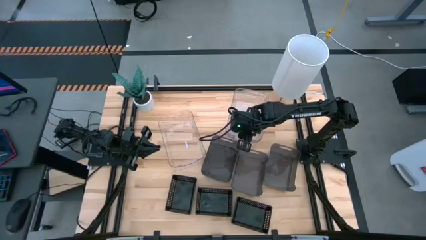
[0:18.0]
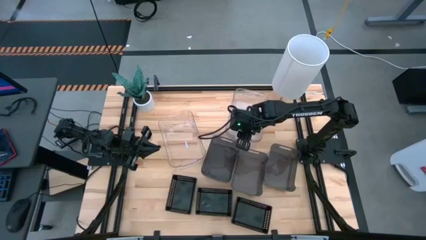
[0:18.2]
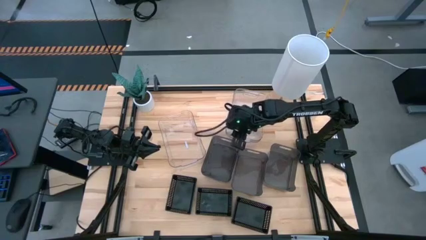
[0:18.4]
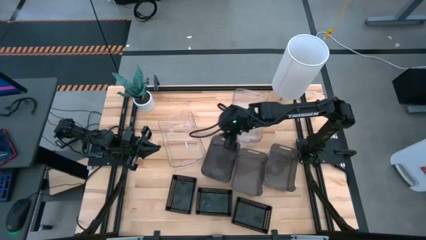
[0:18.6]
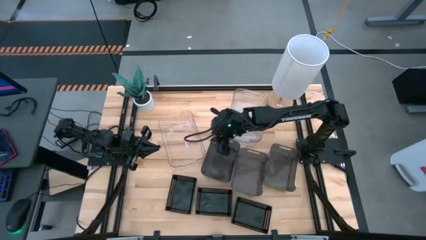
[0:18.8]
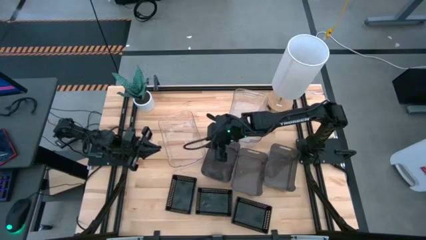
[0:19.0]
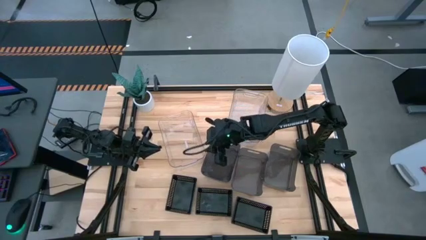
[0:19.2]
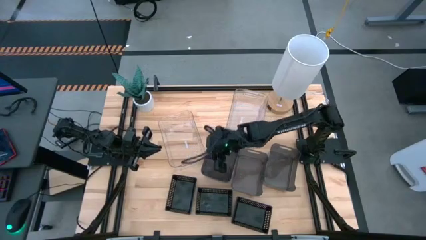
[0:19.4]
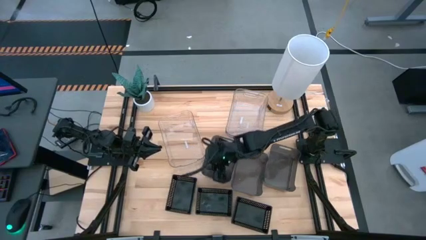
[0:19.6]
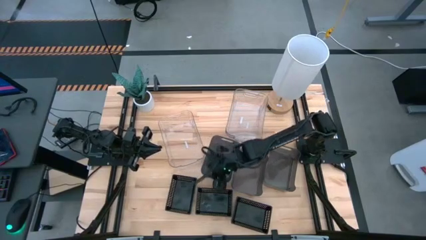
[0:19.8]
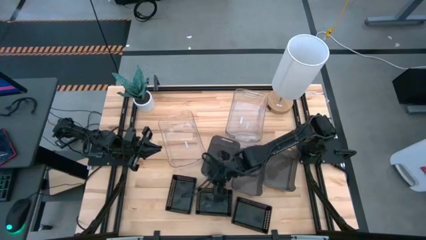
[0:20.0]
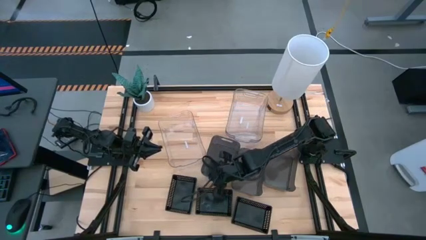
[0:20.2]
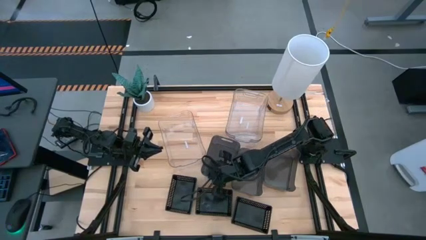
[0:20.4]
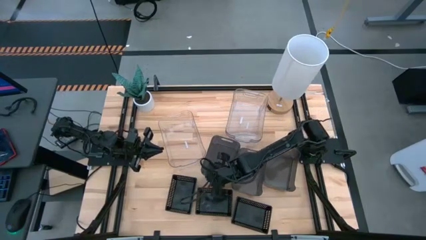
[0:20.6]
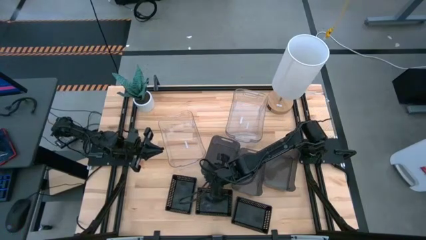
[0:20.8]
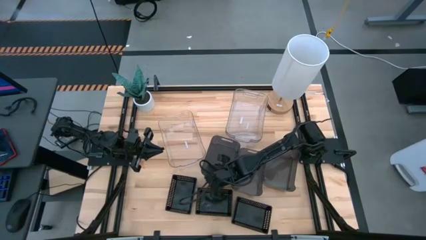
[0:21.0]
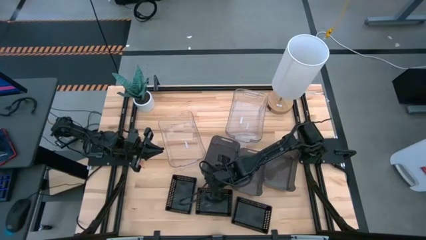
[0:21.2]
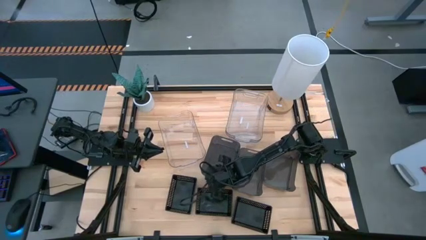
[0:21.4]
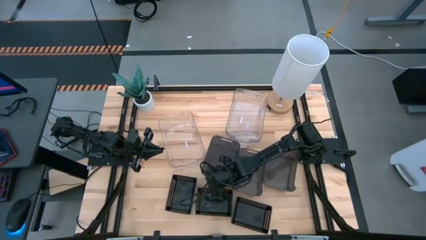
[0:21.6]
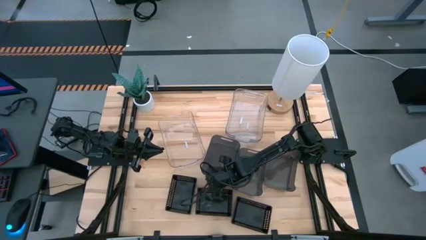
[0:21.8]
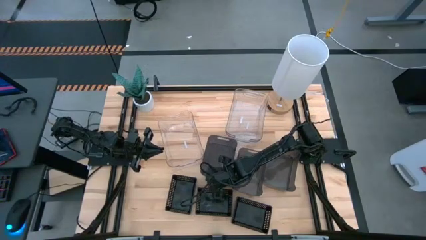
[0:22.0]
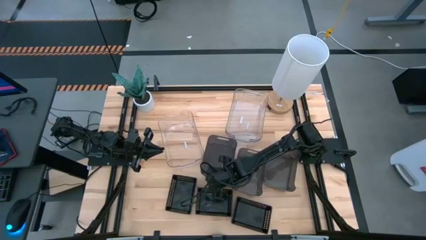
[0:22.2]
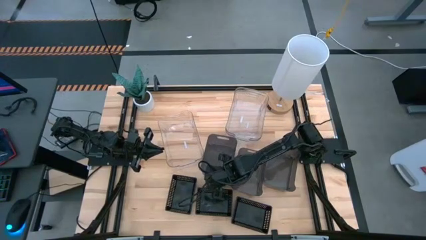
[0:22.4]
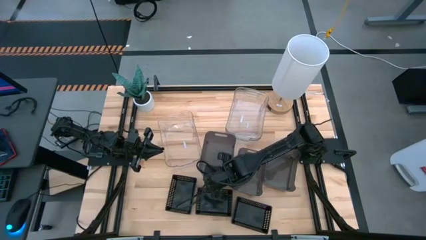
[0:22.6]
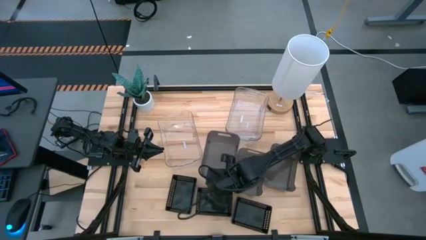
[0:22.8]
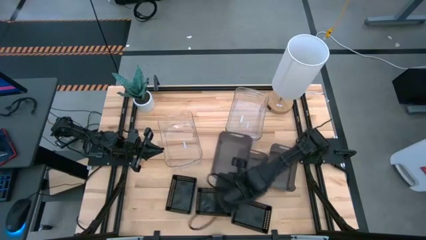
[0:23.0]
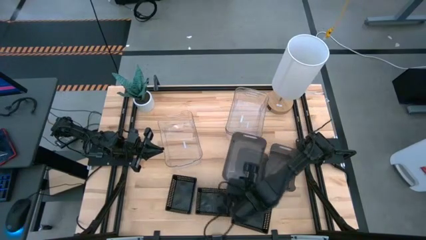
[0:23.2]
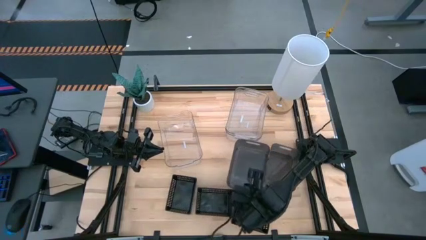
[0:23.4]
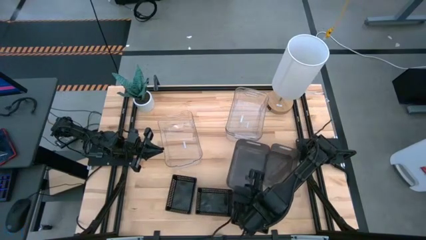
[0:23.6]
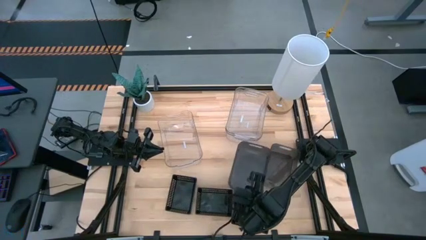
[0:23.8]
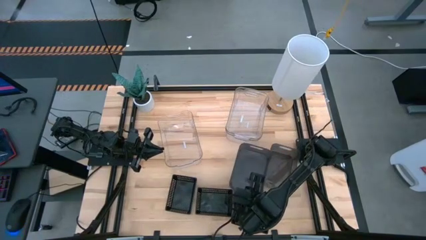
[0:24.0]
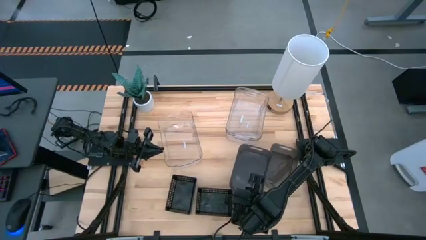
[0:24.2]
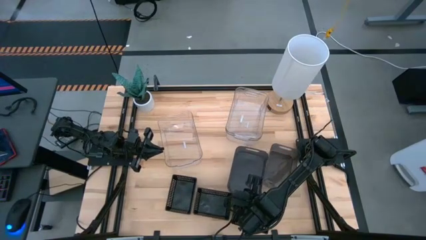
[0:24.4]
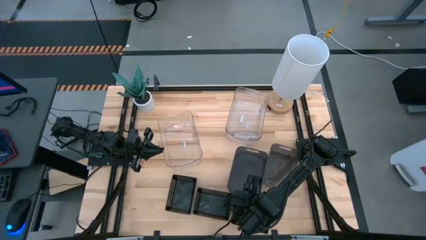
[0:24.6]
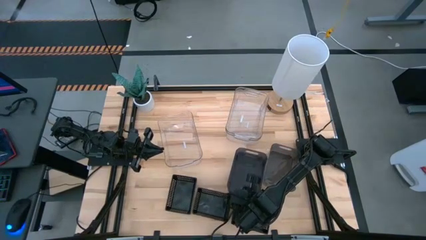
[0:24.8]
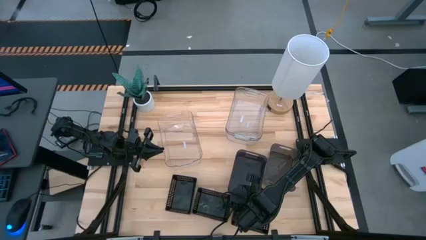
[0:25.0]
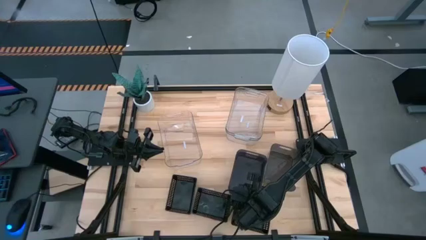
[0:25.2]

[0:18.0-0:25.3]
Stack the left transparent black bin on top of the middle transparent black bin

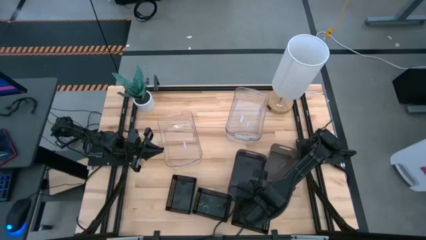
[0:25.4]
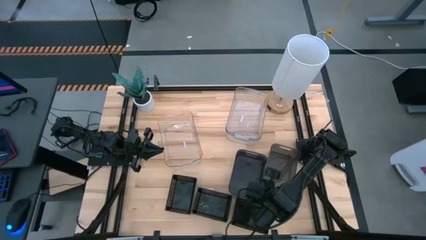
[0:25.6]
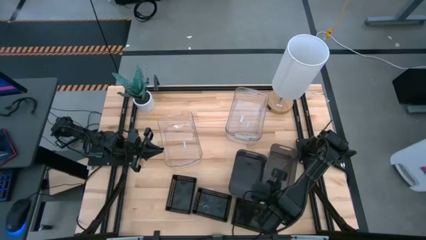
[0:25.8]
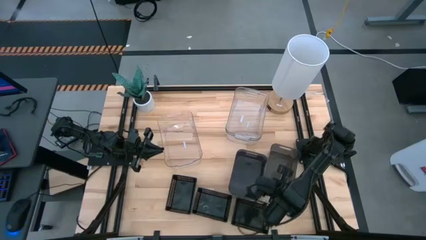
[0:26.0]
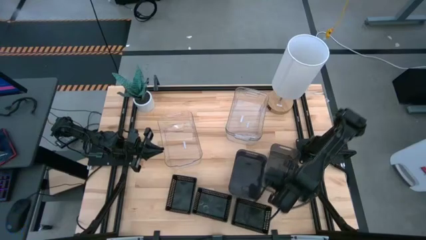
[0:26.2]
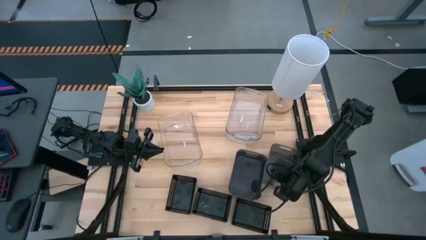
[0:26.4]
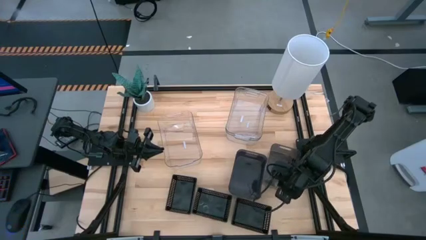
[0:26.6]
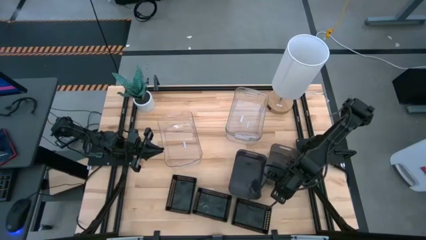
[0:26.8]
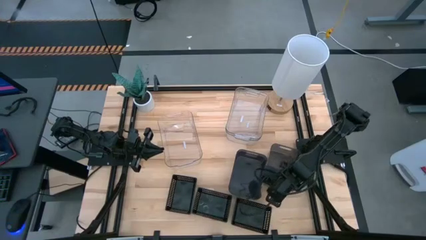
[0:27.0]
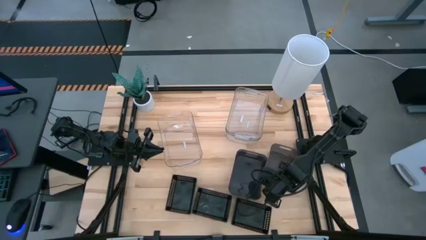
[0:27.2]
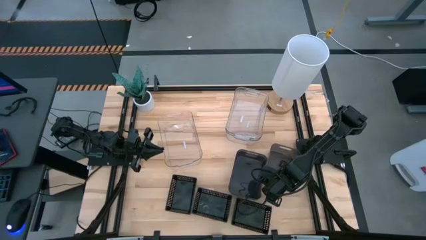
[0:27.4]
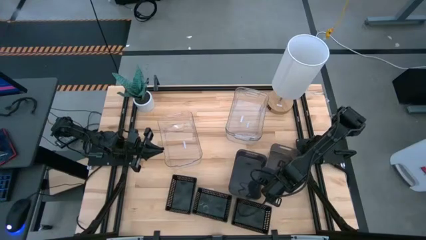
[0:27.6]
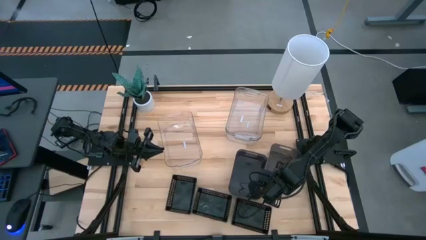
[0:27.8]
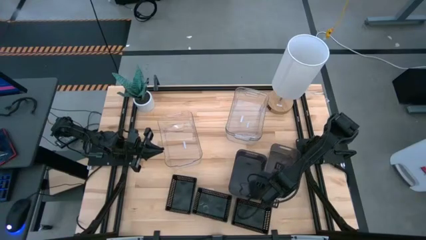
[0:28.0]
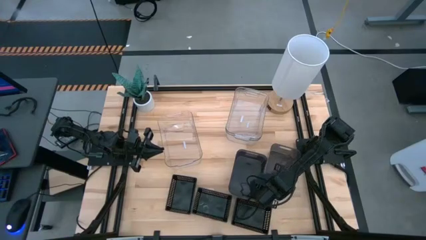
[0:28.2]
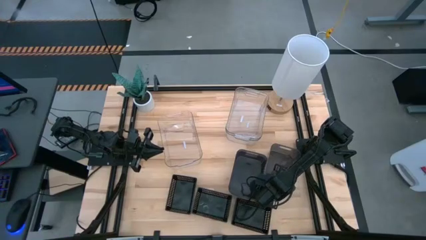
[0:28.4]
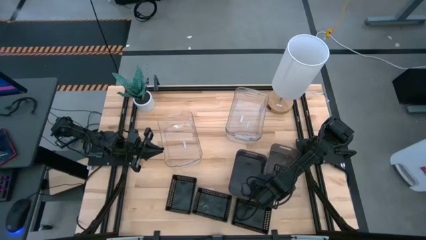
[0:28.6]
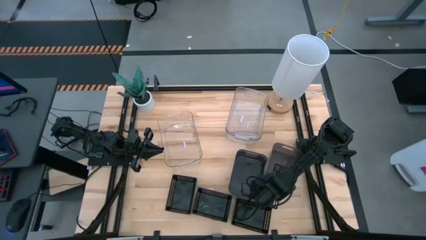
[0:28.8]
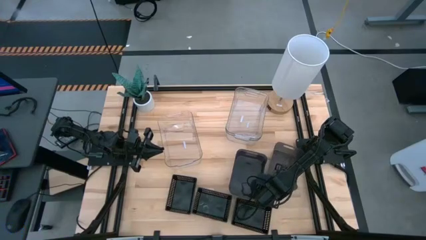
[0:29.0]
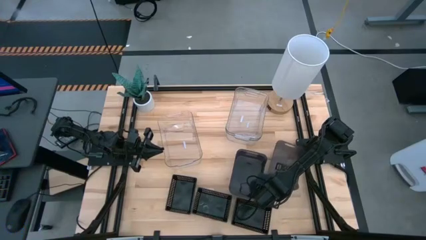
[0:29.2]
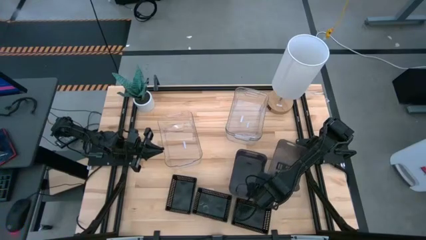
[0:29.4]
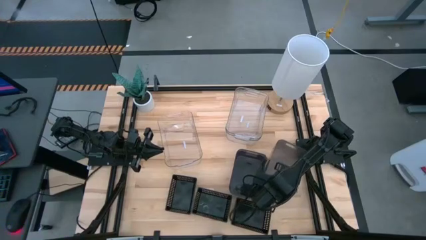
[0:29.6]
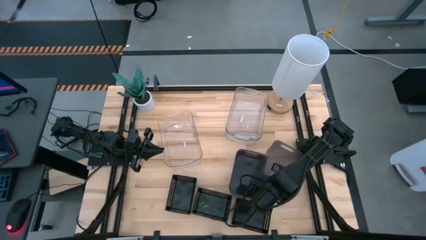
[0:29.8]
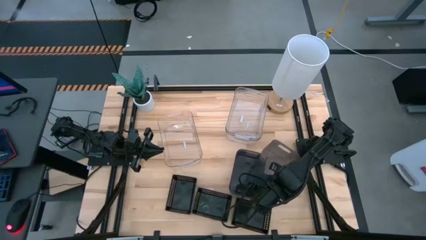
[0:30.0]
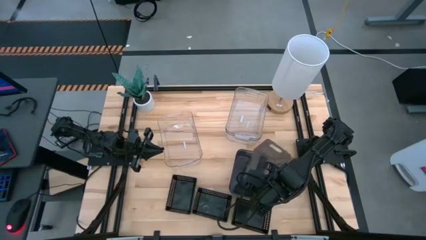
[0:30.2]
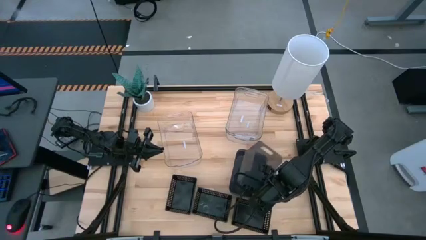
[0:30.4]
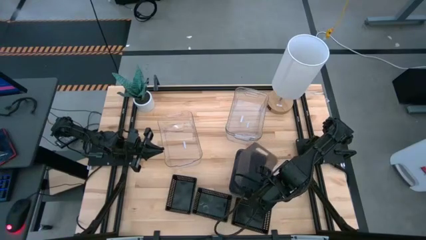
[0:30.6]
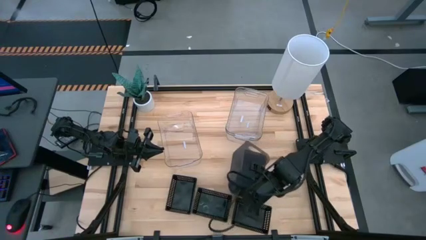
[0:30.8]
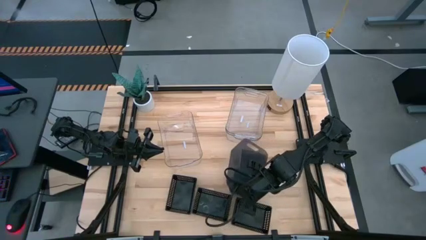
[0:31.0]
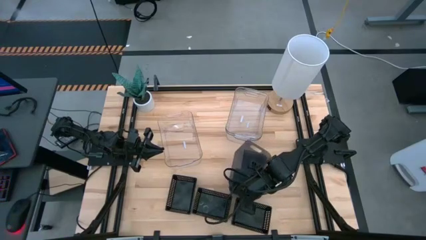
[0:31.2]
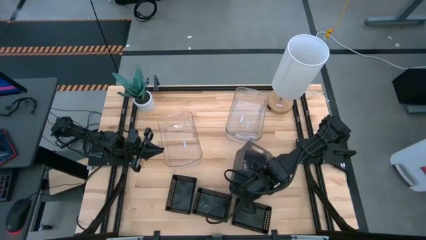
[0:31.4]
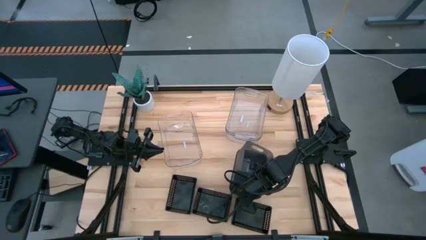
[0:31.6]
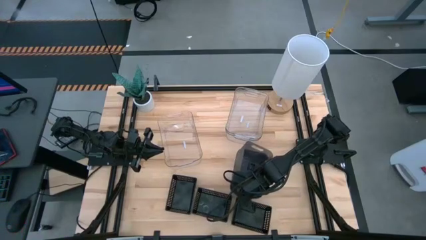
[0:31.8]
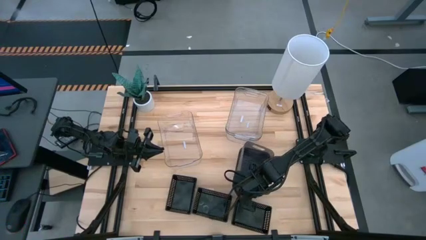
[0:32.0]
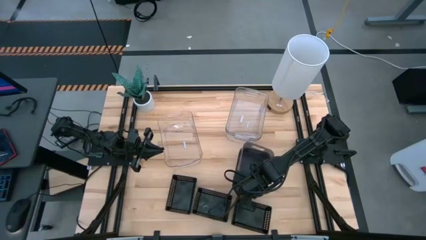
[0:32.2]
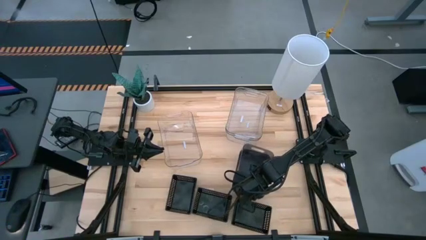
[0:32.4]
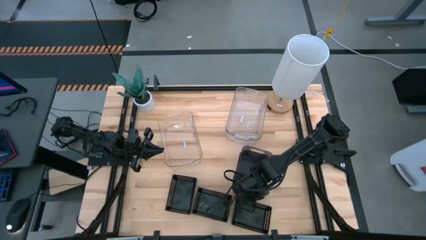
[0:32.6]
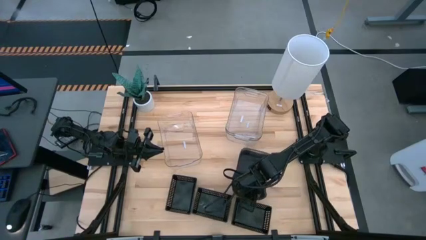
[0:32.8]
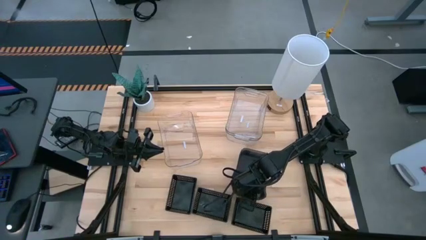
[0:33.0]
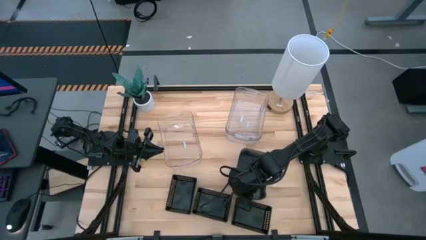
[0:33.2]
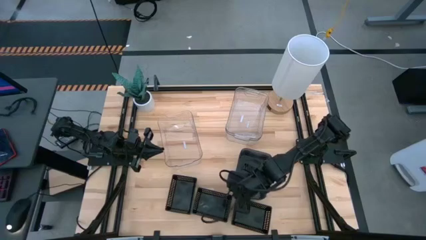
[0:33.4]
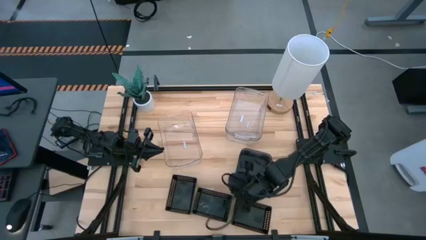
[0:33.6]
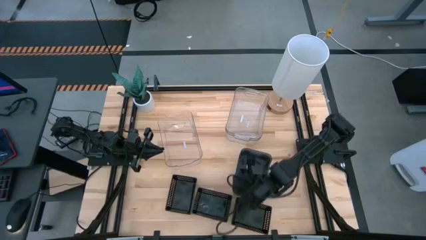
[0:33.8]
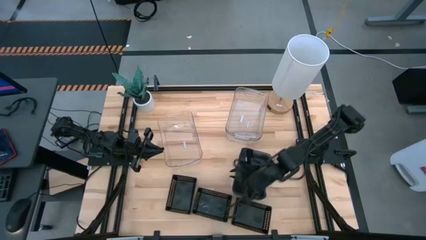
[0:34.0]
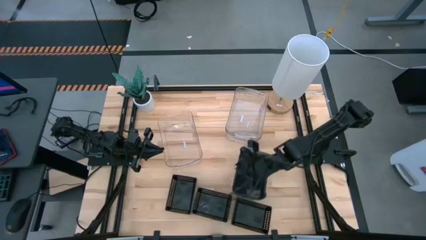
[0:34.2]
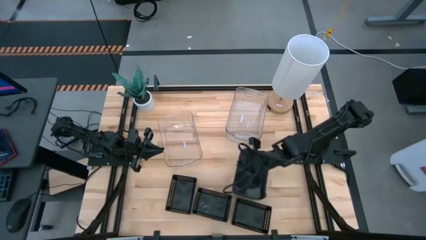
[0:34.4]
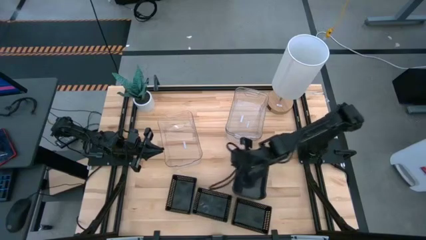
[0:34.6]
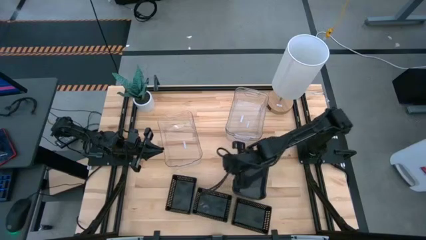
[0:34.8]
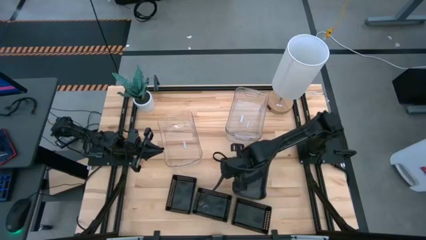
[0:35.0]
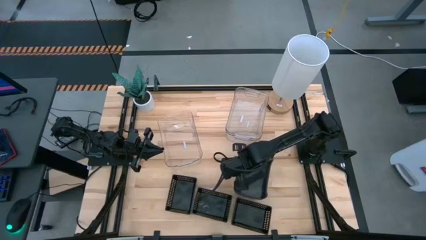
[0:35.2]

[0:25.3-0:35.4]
Stack the right transparent black bin on top of the left transparent black bin
